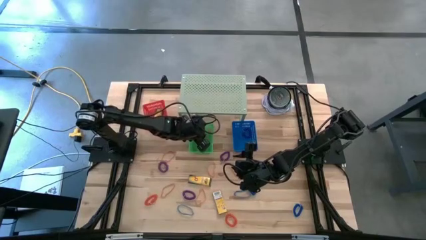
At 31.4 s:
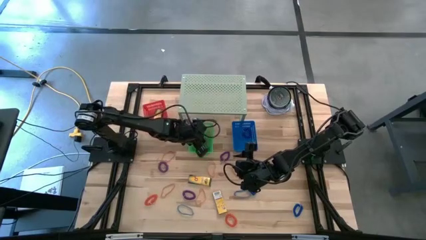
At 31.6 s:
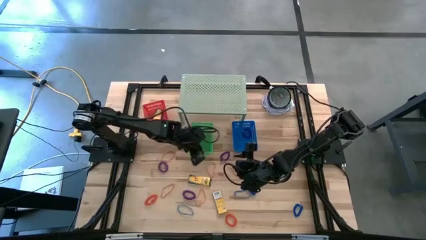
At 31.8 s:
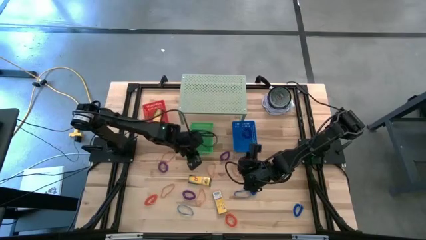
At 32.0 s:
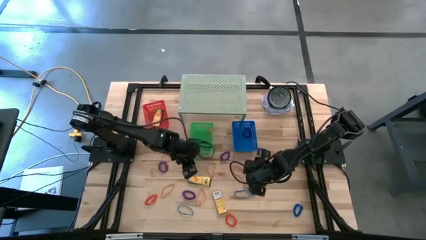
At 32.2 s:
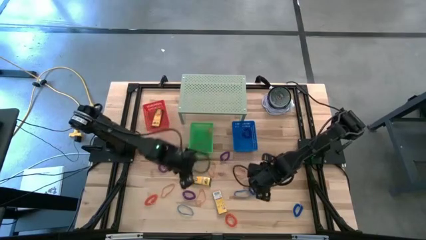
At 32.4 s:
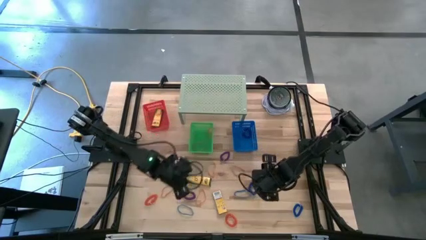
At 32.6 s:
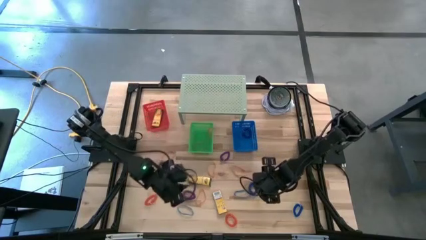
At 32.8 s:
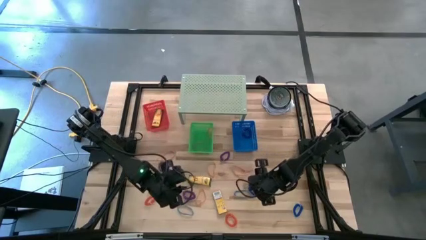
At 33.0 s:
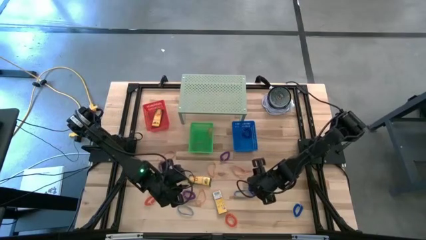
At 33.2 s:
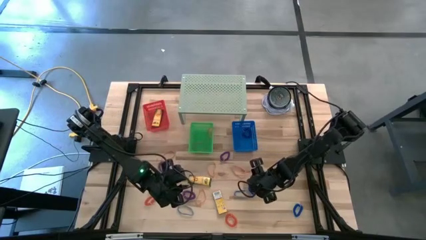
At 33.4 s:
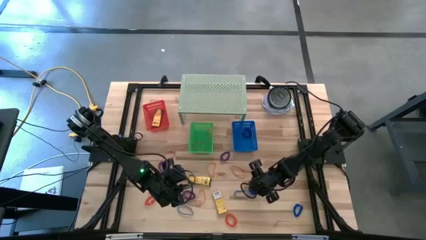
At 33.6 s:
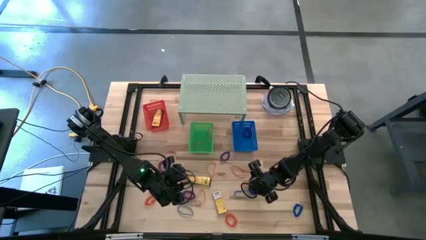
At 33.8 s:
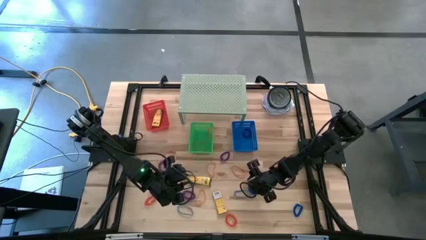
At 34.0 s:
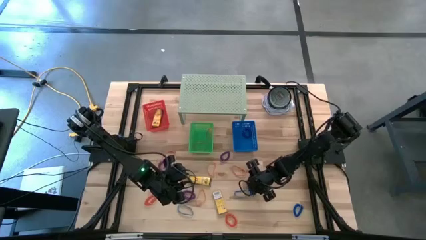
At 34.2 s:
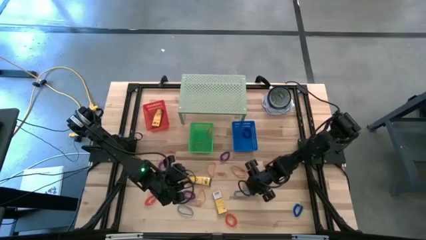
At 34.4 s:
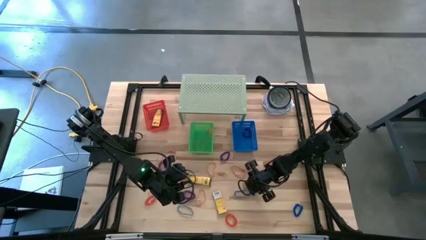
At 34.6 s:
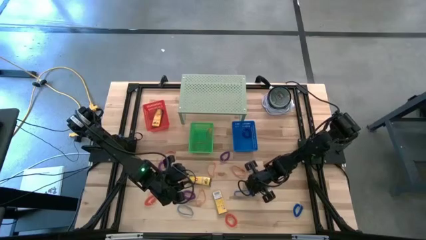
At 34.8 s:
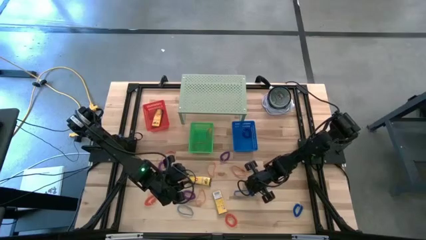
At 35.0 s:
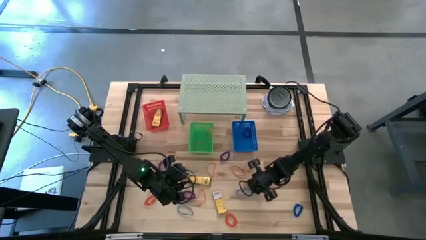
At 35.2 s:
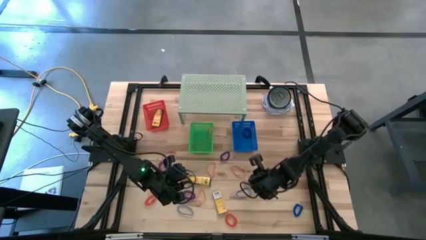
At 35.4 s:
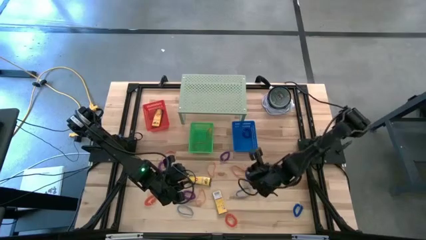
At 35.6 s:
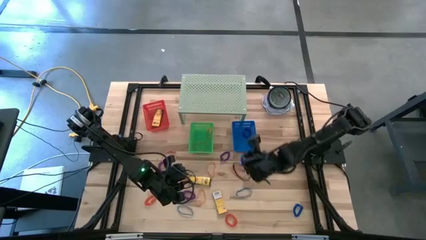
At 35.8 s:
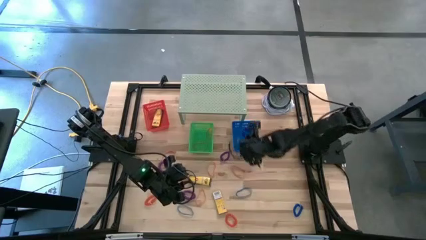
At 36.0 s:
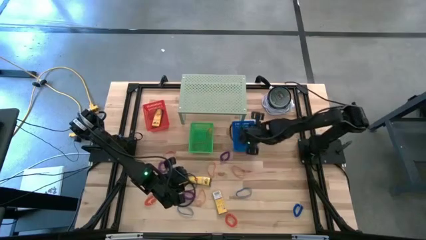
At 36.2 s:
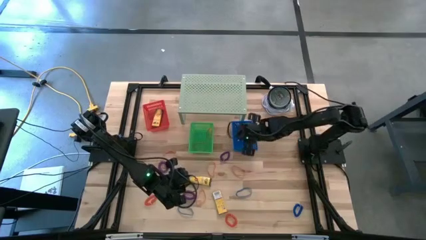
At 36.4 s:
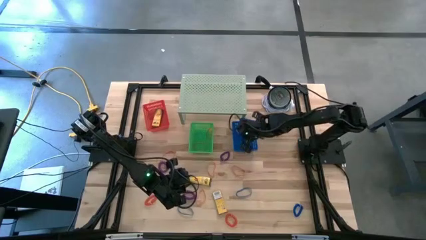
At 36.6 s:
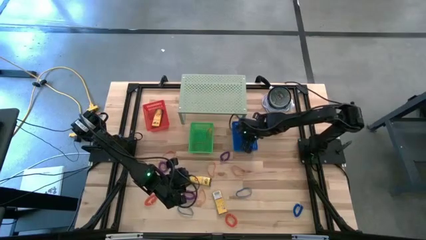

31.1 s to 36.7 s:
Task: Pick & Place Office Desk Supplies
Put the blue spring keychain into the blue bin

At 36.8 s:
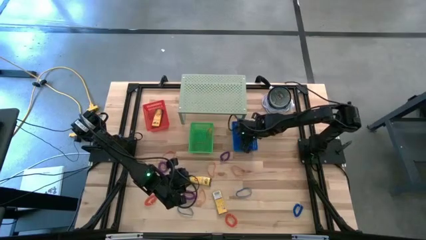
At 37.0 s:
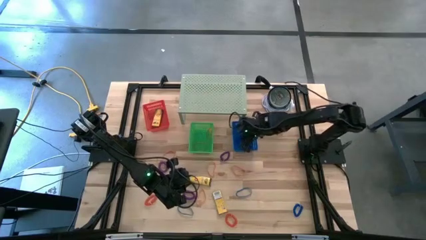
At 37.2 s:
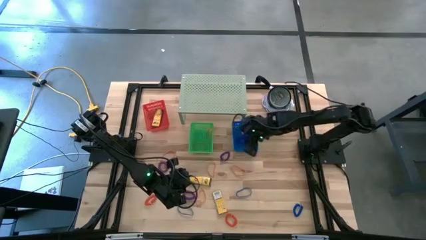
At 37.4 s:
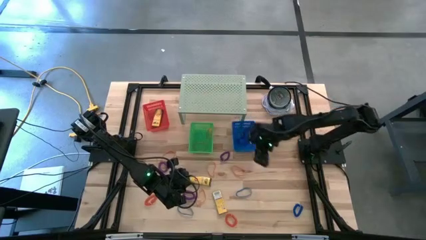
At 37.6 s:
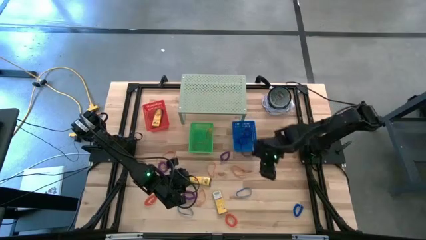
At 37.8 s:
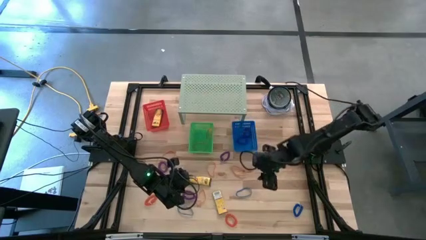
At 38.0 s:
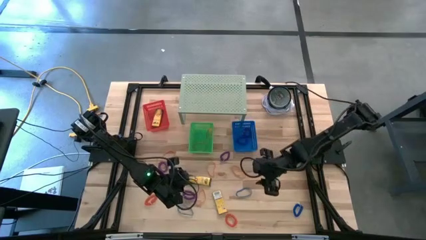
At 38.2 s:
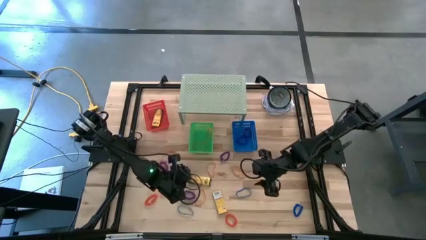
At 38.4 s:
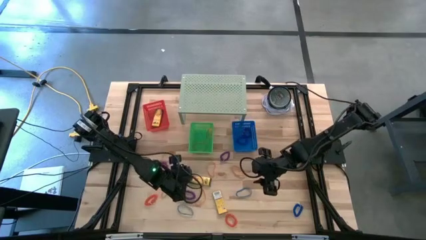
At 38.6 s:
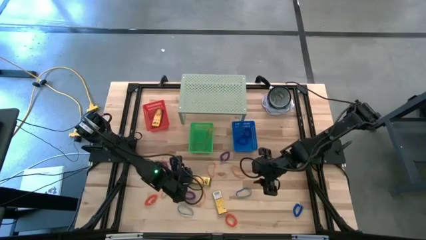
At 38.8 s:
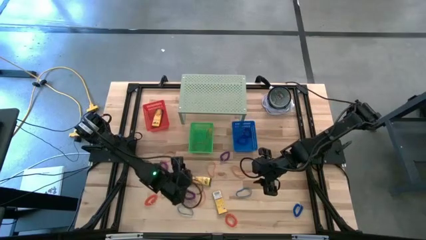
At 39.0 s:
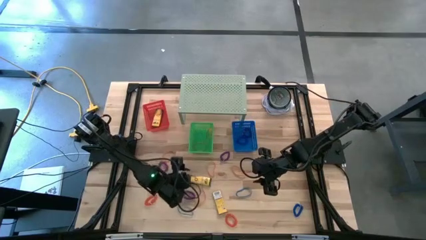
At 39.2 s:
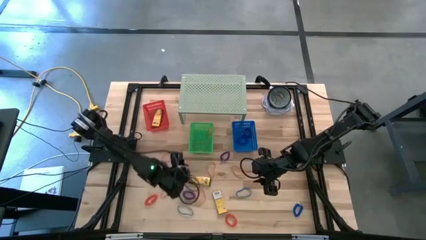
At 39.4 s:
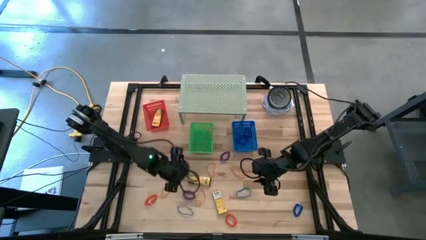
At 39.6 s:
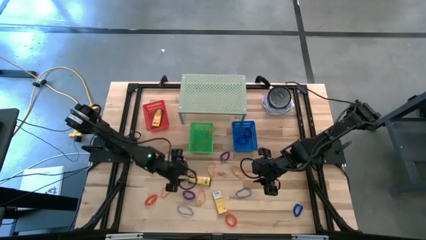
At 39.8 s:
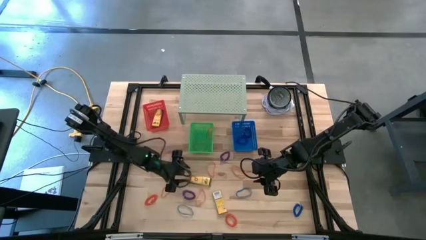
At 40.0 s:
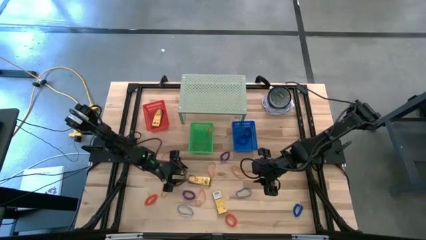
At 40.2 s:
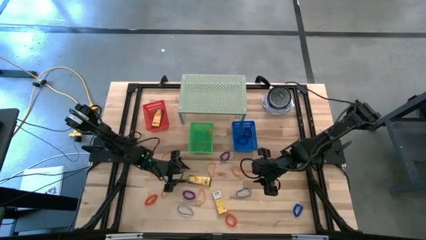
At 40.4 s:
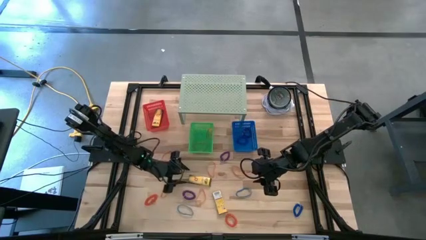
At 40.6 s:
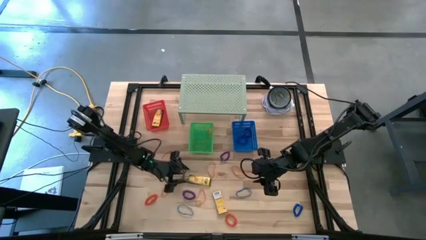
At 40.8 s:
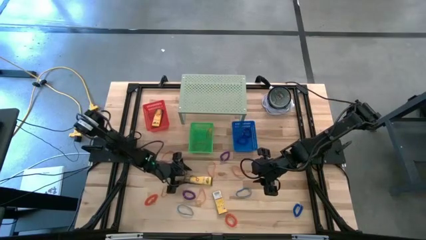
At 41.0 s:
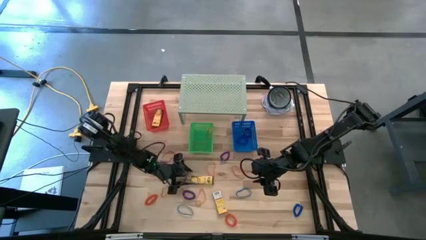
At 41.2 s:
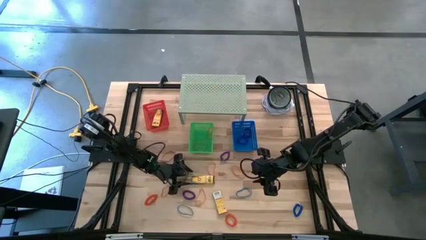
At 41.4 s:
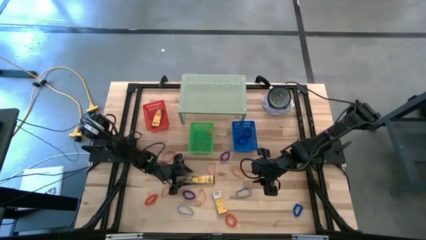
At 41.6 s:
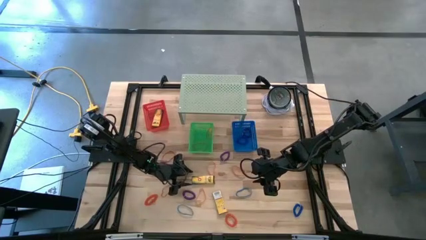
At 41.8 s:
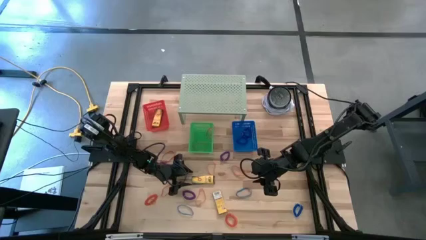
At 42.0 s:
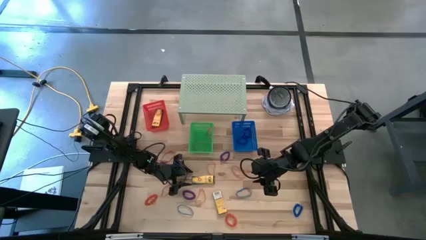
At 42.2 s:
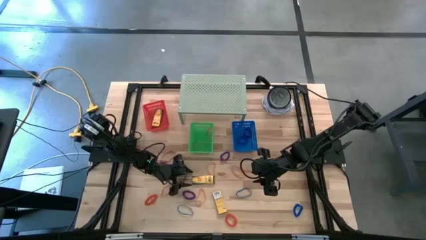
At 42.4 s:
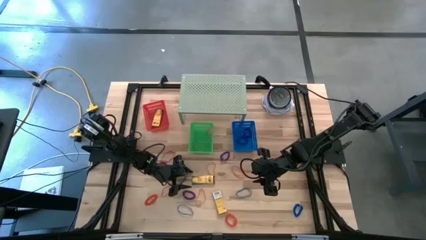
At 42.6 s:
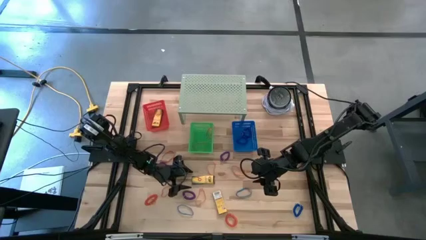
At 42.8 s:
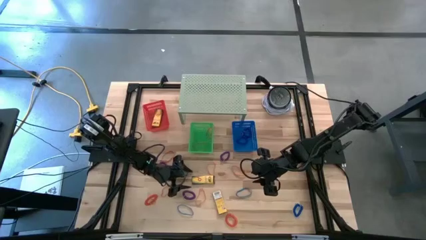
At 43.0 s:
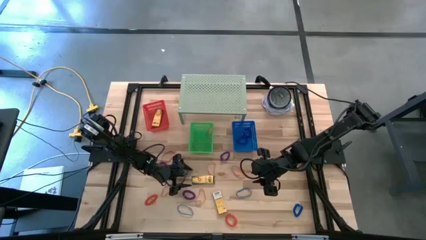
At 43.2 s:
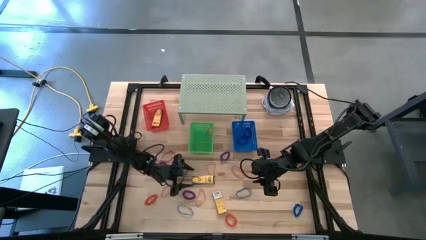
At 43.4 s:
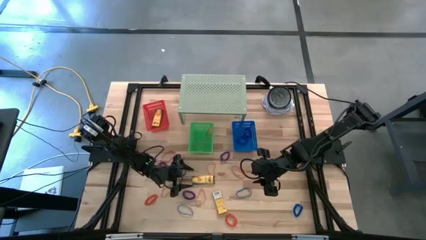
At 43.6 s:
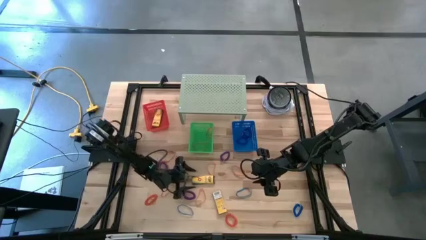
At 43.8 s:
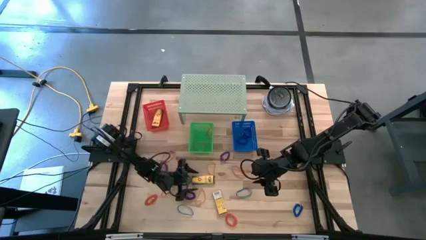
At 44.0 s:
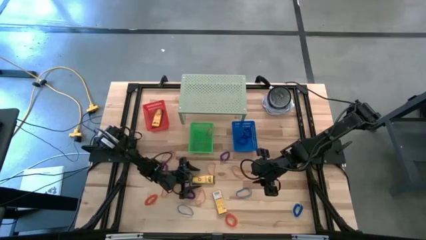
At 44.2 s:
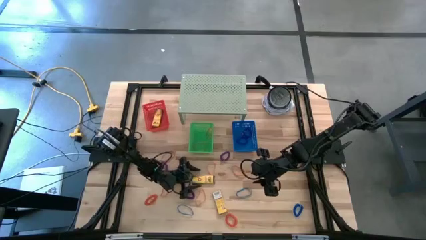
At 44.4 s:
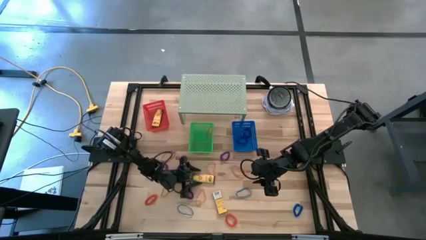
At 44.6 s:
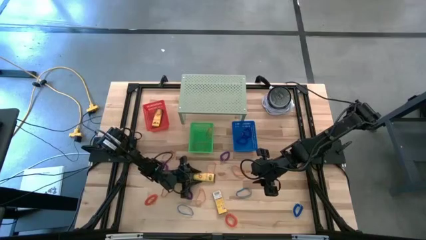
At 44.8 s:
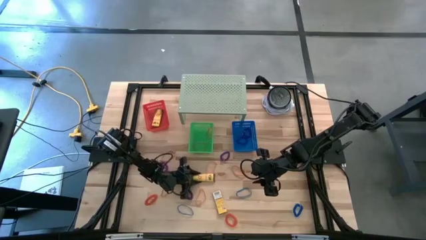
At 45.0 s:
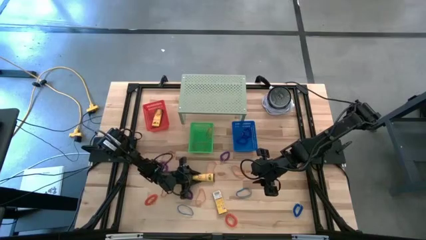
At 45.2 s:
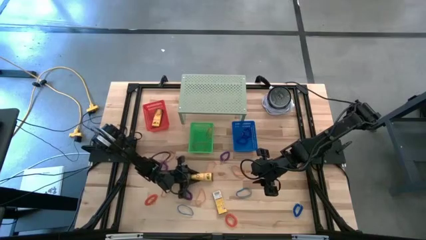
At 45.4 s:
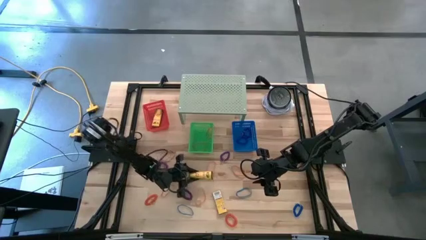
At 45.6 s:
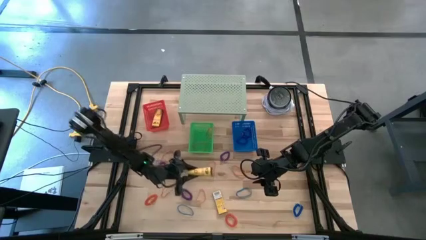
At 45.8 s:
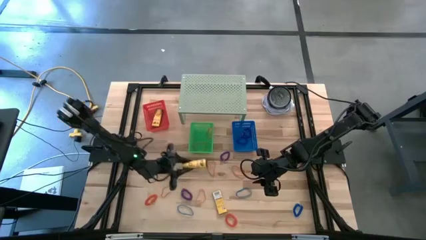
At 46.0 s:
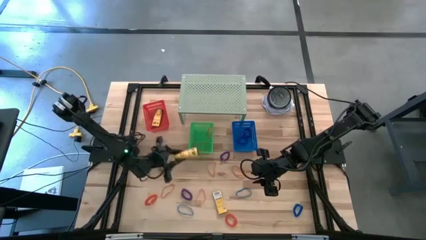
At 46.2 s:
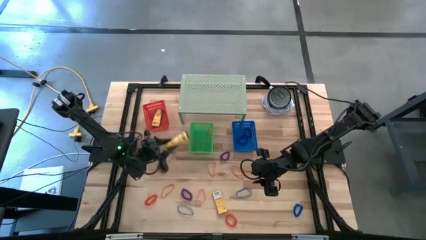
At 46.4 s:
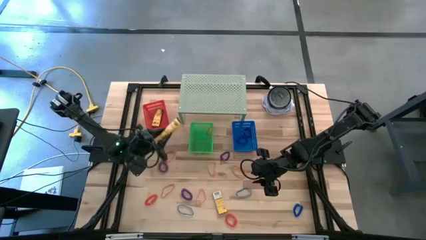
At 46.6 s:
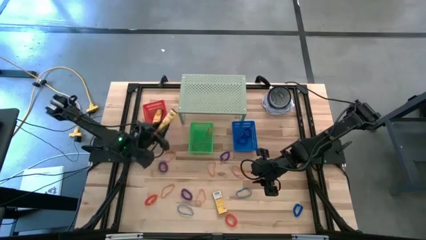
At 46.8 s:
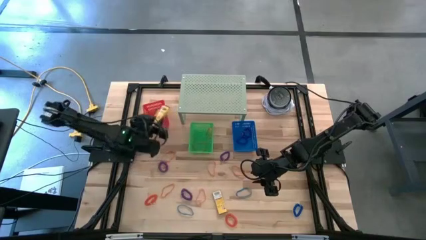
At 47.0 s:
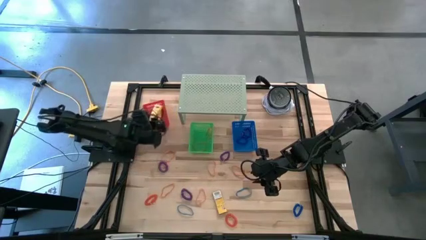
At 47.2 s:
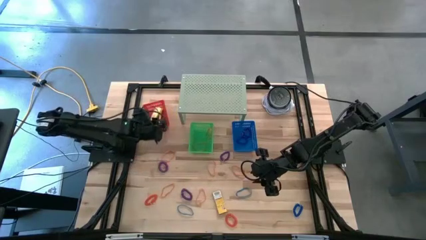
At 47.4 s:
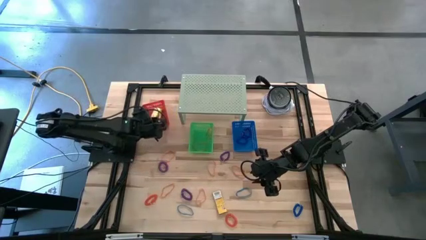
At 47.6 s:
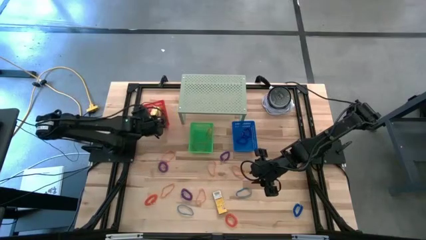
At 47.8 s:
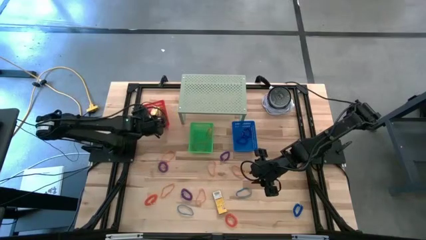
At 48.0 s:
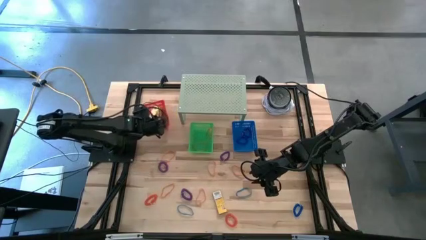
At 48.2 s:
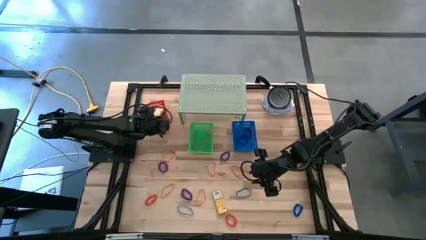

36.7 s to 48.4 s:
Put the yellow crayon box into the red bin
